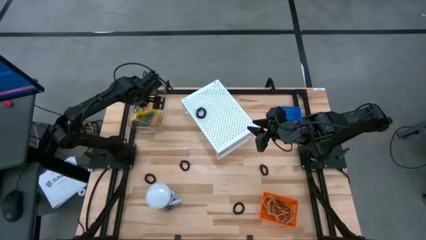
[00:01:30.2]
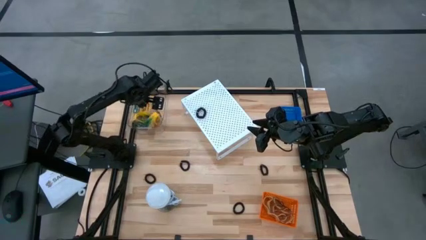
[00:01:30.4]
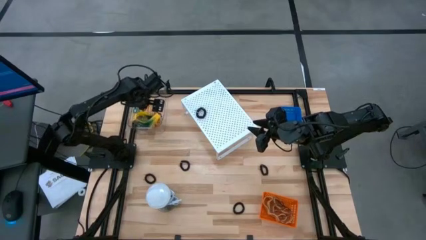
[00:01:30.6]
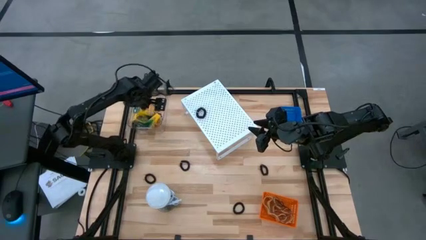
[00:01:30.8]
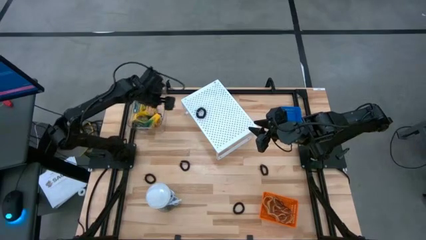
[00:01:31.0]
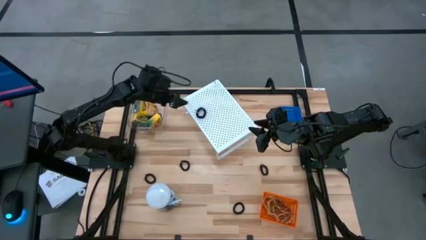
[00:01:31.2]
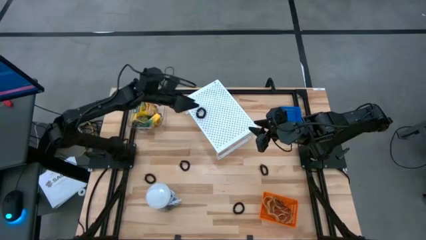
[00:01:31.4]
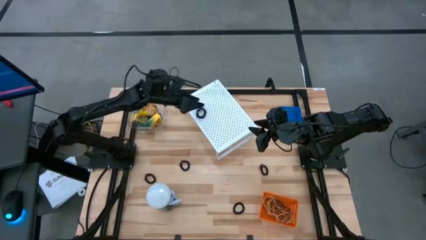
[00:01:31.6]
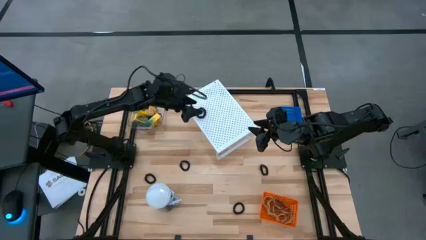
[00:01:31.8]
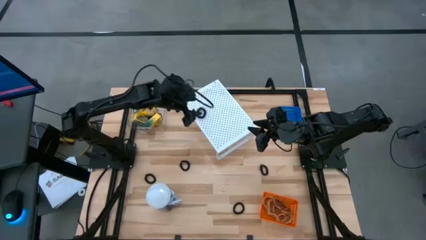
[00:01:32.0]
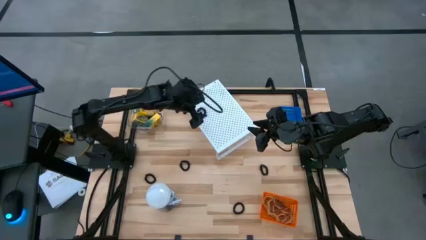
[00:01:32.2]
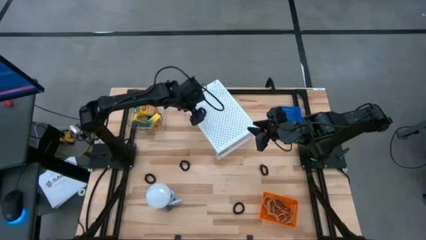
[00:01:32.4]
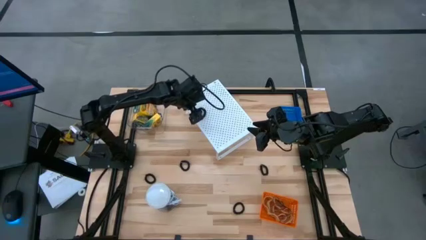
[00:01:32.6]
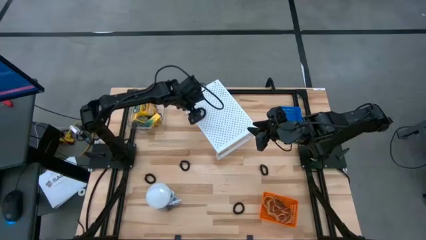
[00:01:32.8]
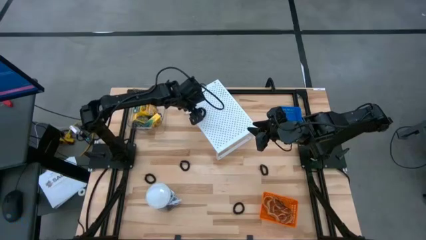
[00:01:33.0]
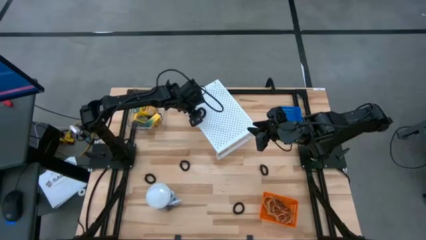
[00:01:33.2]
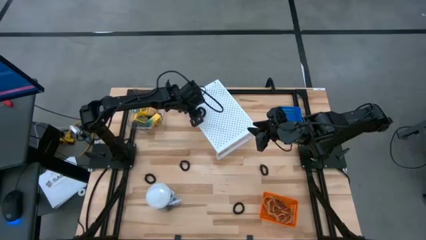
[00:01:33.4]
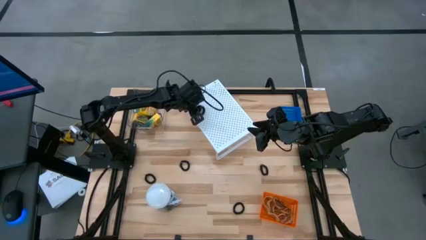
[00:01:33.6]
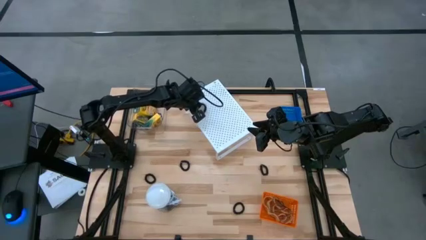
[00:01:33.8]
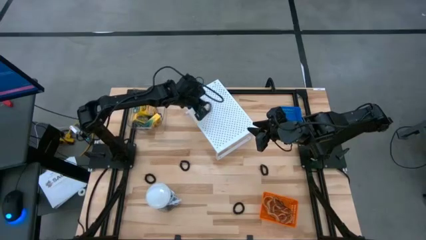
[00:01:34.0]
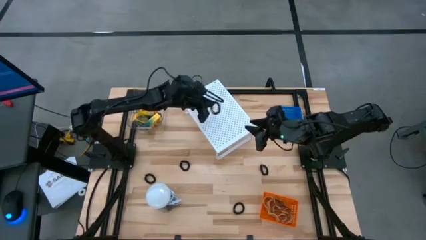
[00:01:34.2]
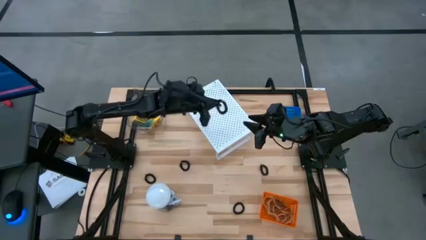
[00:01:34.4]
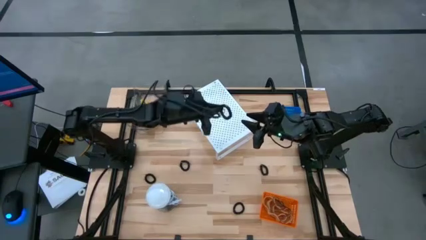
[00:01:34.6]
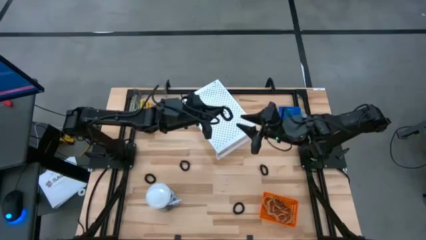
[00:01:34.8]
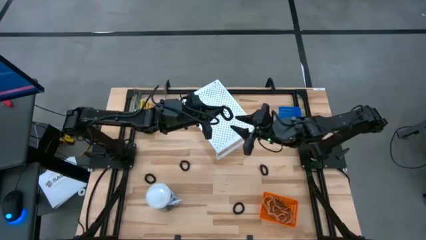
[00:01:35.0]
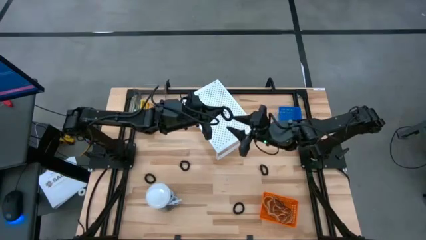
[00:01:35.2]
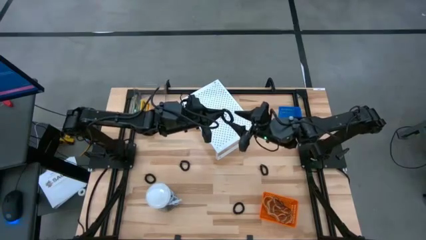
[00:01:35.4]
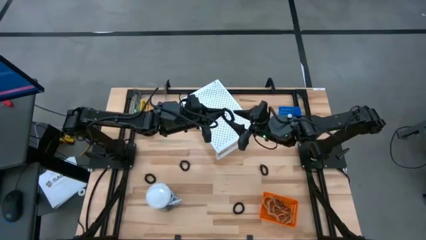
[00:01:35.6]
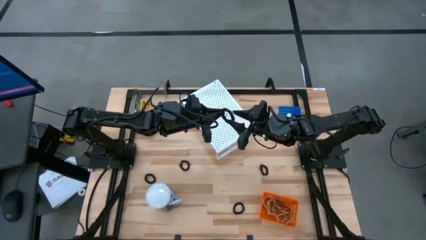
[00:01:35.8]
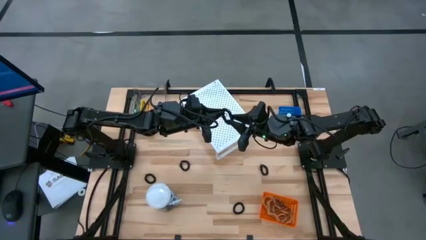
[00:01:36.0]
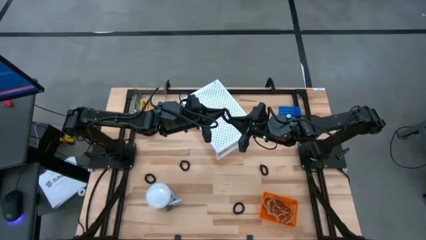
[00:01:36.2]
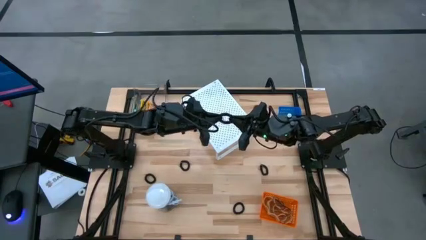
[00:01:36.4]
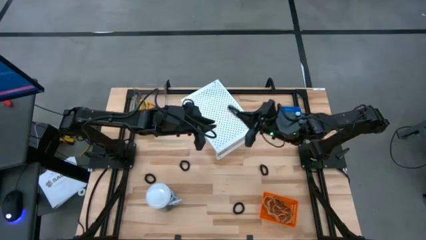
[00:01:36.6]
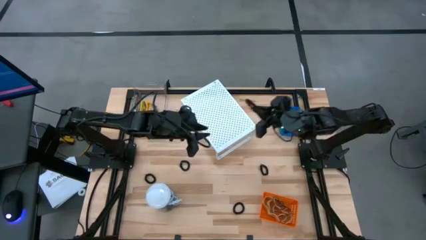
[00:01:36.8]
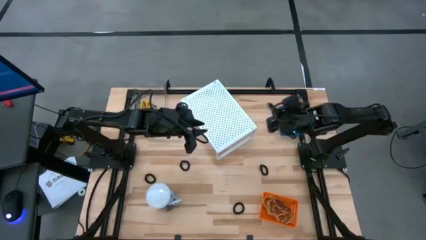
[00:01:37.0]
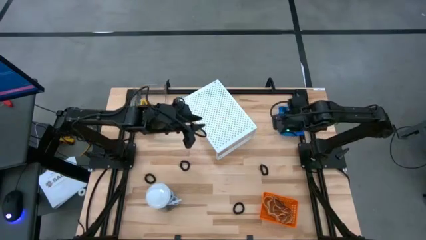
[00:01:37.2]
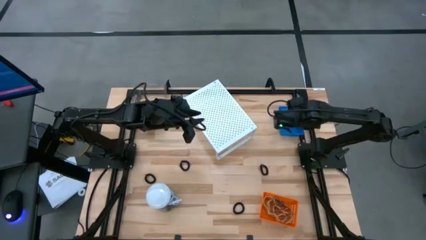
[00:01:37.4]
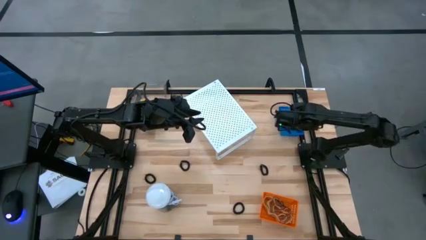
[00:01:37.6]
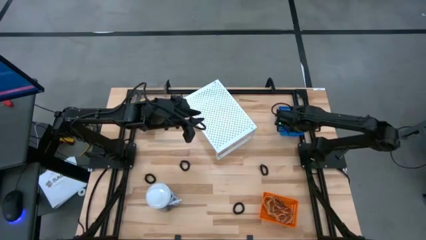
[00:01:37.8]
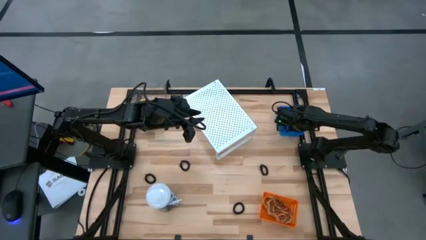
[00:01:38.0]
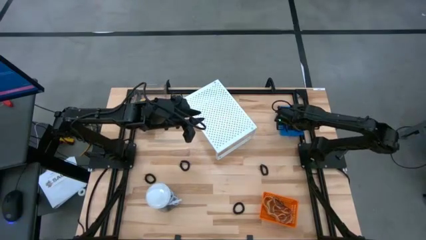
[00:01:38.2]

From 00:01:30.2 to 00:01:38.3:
Task: Pick & Place Office Desk Supplies
Put the black spring keychain into the blue bin

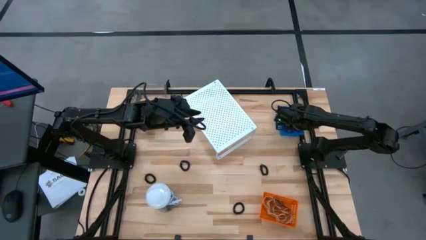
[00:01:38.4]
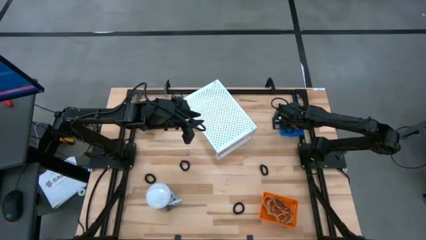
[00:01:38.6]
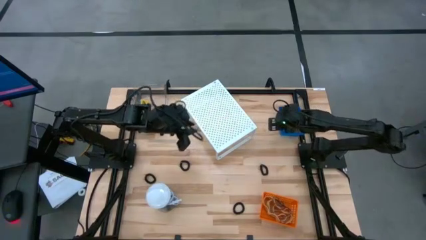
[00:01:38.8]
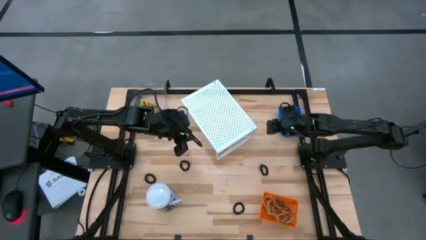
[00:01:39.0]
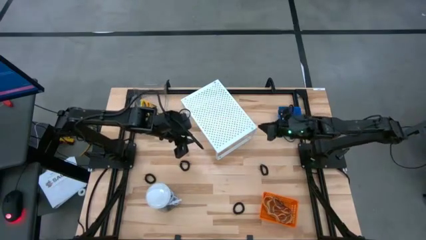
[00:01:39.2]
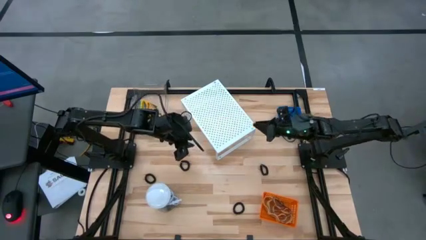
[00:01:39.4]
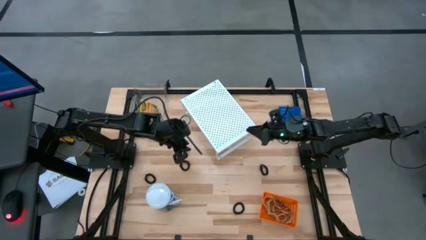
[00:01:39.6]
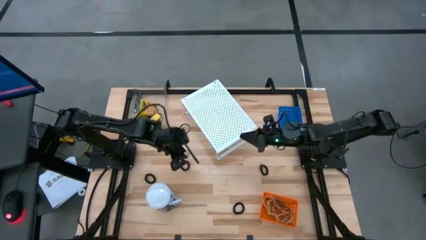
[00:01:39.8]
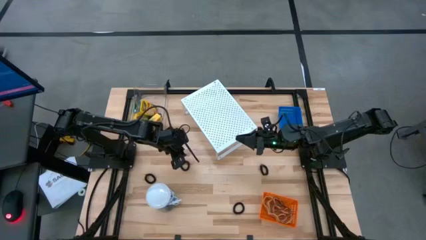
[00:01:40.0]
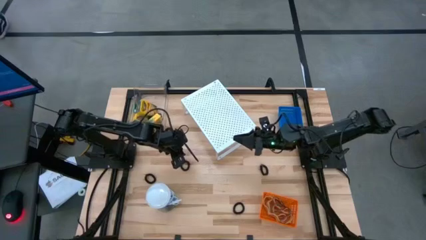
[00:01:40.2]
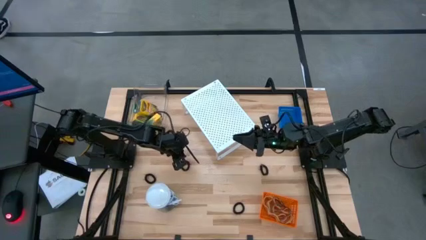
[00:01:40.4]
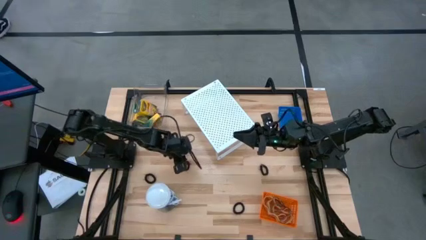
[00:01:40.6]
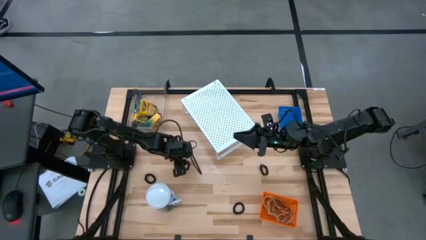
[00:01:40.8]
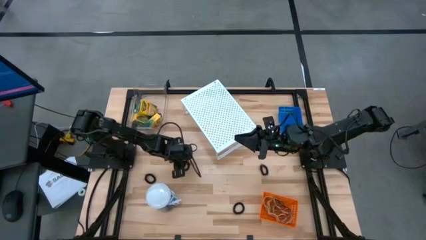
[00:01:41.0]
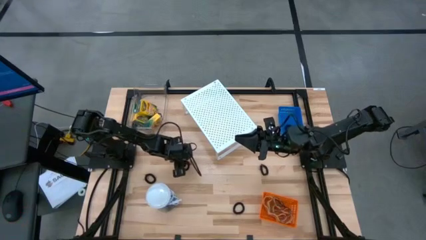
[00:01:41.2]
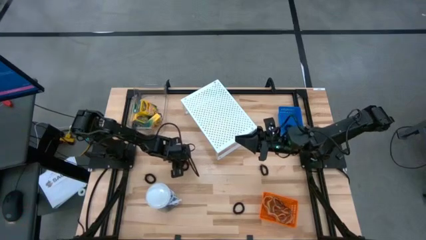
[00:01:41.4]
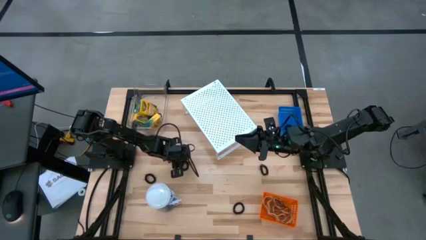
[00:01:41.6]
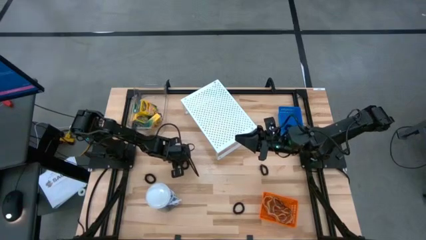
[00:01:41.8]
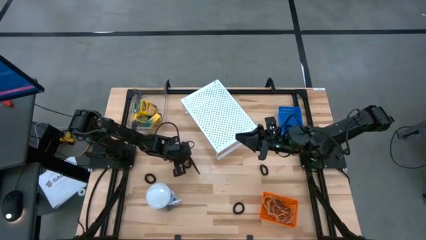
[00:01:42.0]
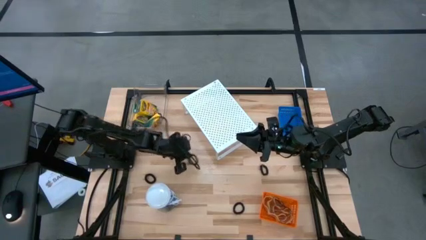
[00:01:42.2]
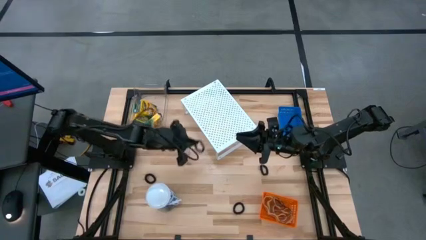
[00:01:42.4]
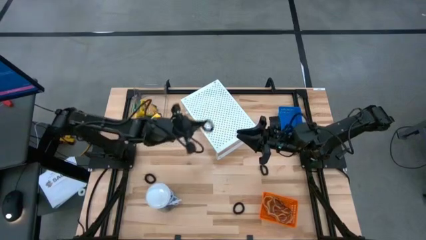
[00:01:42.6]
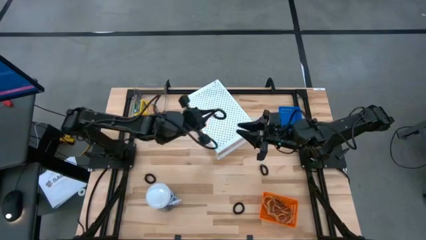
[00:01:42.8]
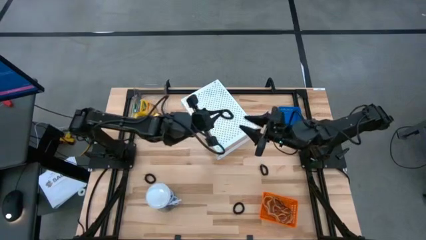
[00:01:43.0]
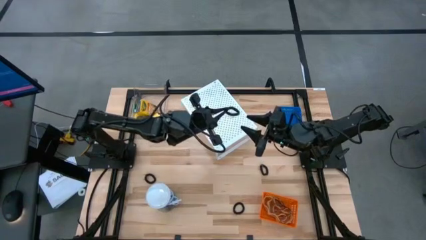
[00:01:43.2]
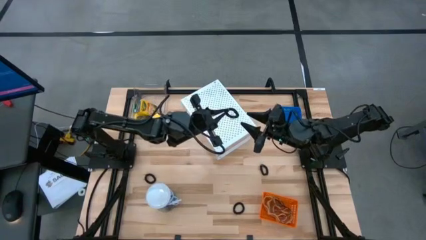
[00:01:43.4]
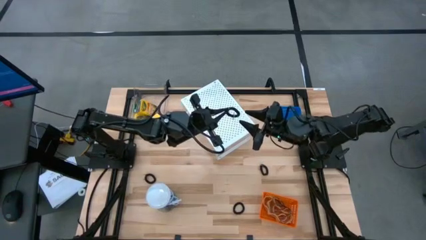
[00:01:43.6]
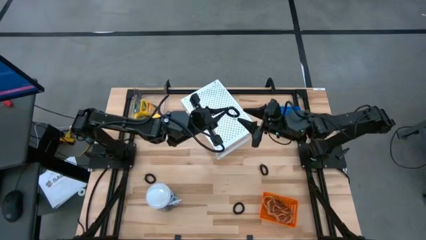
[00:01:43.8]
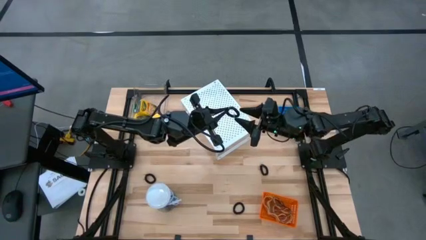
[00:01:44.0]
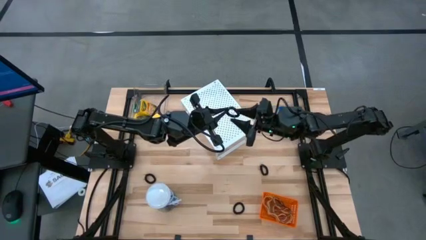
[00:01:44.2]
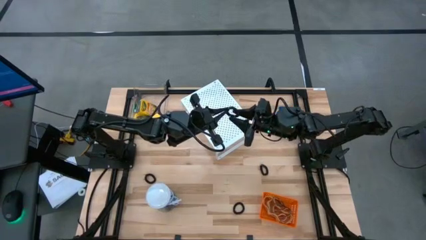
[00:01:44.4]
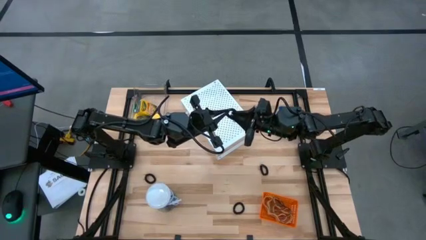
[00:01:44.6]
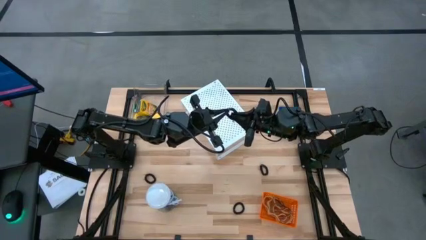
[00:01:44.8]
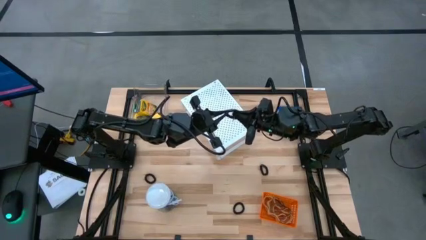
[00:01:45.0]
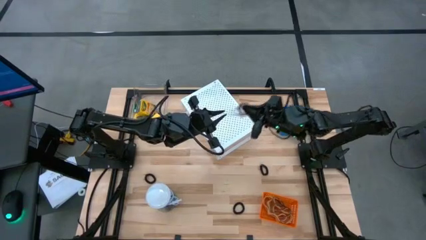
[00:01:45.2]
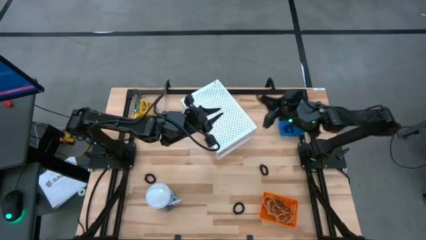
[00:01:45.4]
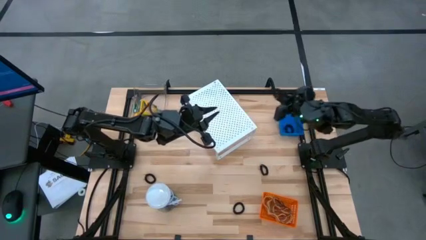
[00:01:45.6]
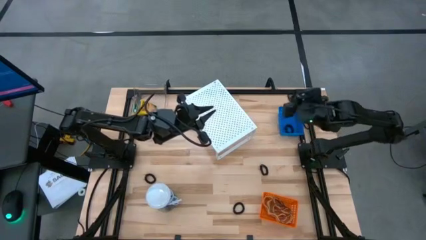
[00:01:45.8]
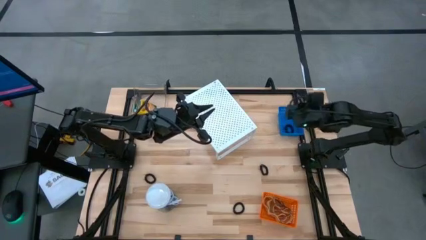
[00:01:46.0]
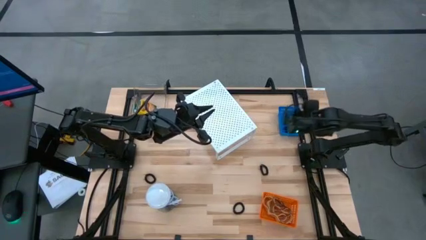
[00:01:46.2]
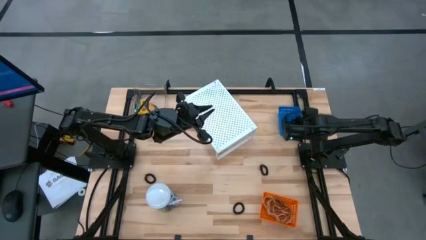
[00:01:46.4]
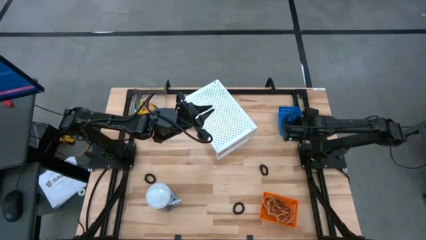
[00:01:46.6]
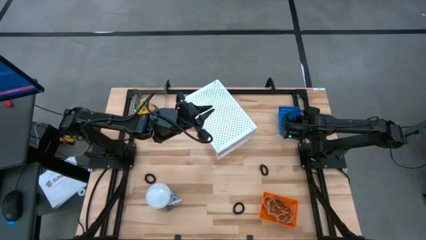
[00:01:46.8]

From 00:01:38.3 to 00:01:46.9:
Put the black spring keychain into the blue bin
